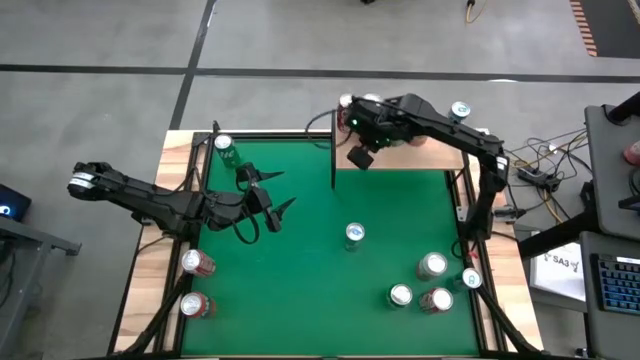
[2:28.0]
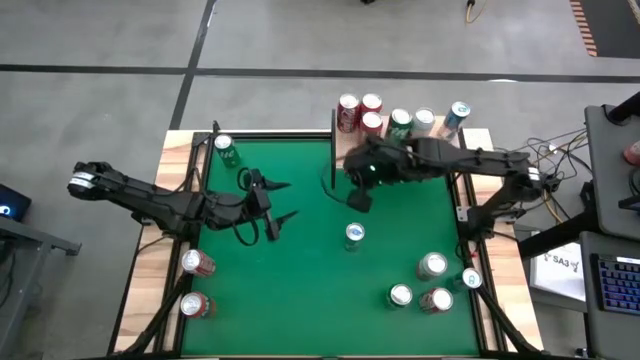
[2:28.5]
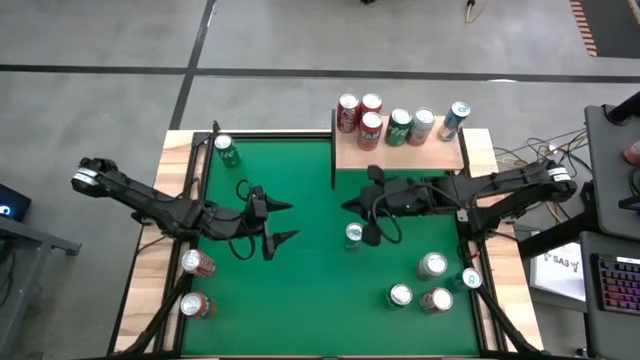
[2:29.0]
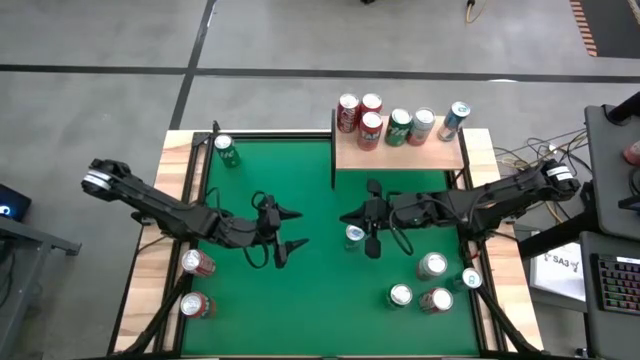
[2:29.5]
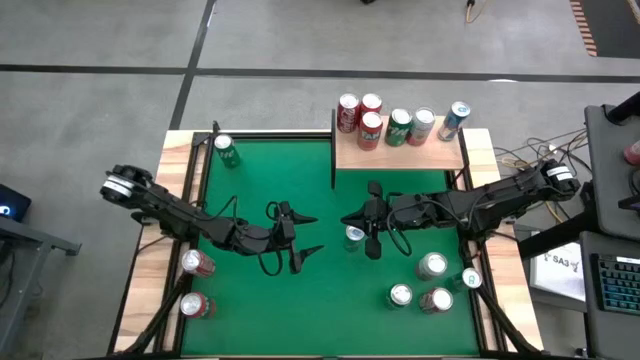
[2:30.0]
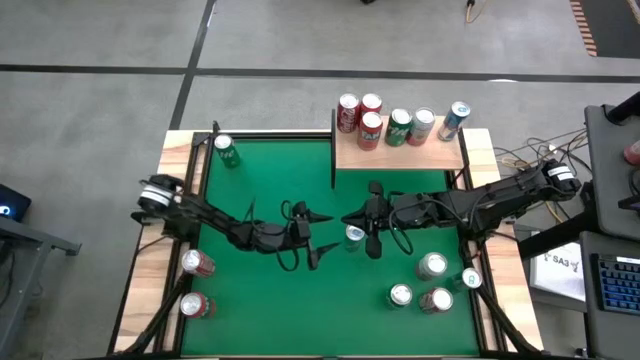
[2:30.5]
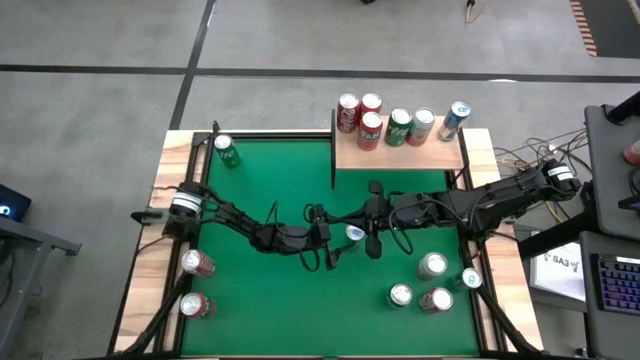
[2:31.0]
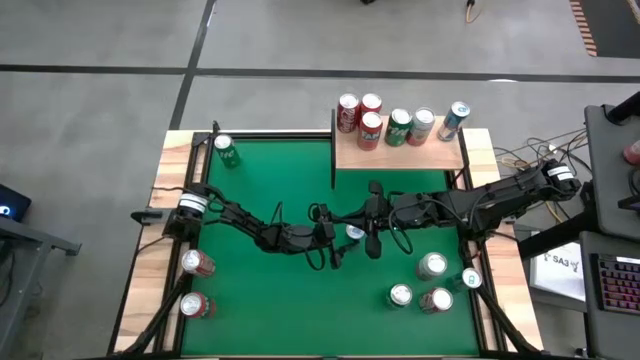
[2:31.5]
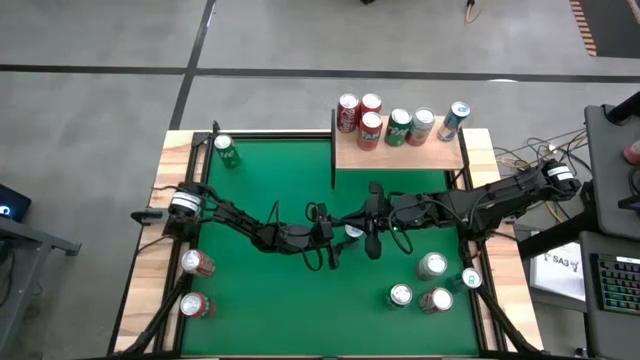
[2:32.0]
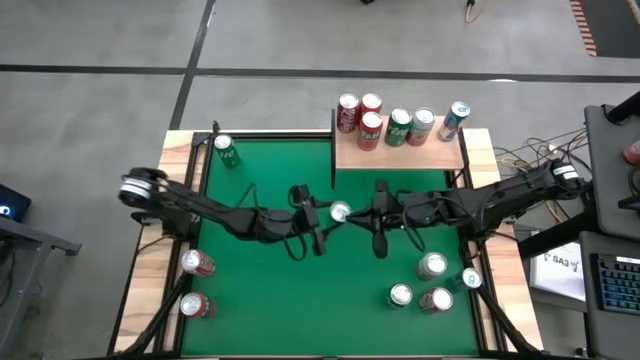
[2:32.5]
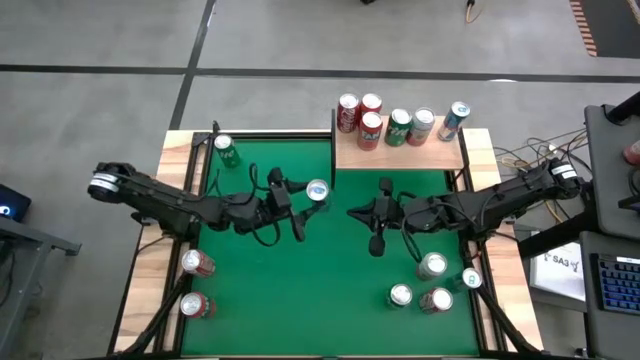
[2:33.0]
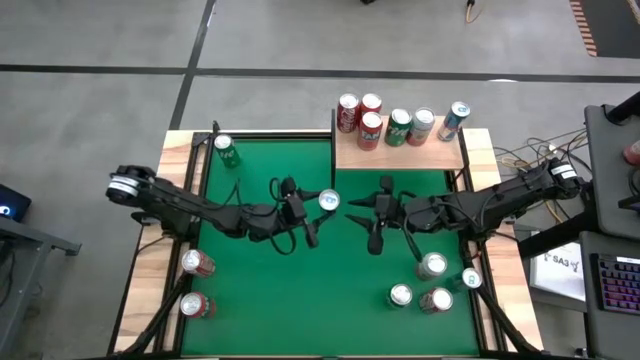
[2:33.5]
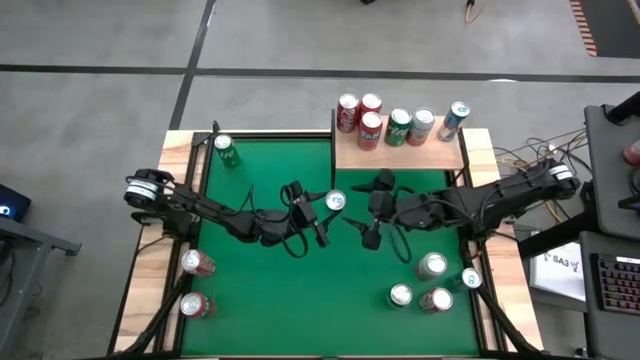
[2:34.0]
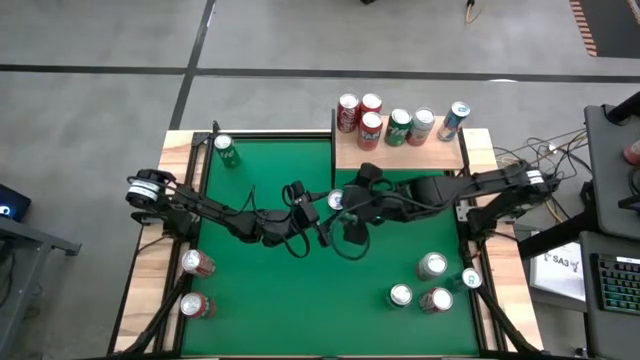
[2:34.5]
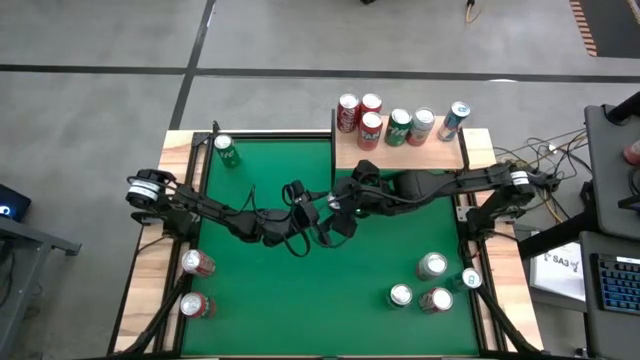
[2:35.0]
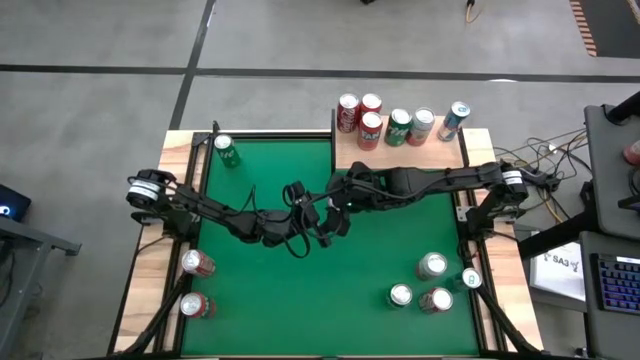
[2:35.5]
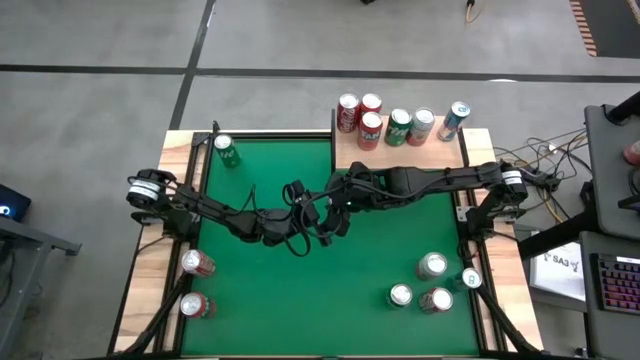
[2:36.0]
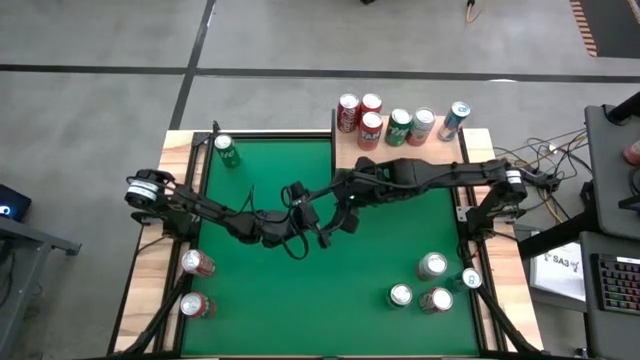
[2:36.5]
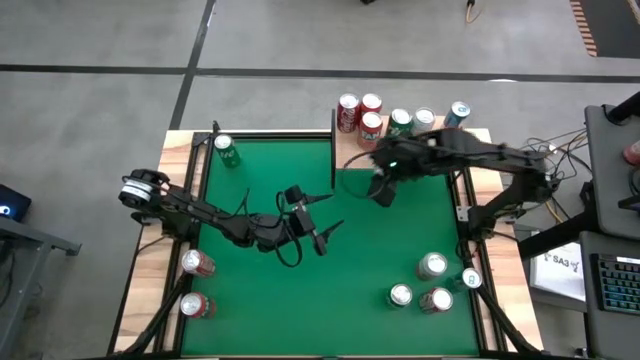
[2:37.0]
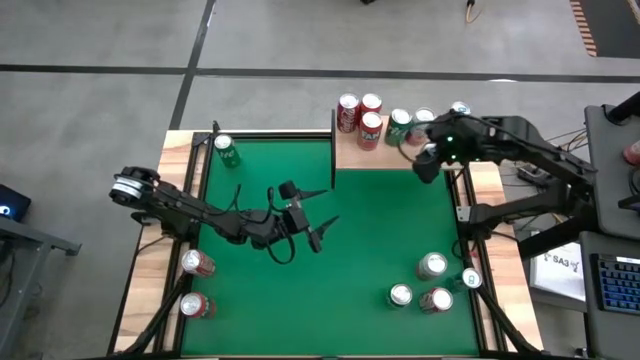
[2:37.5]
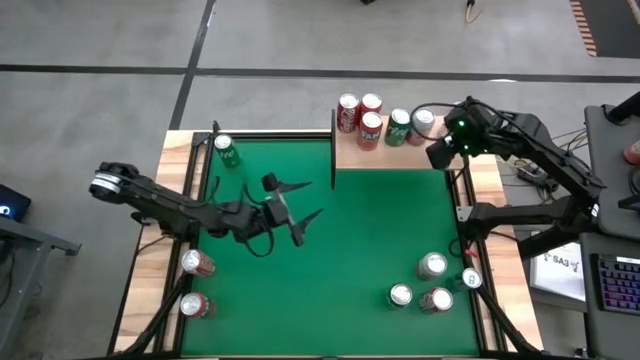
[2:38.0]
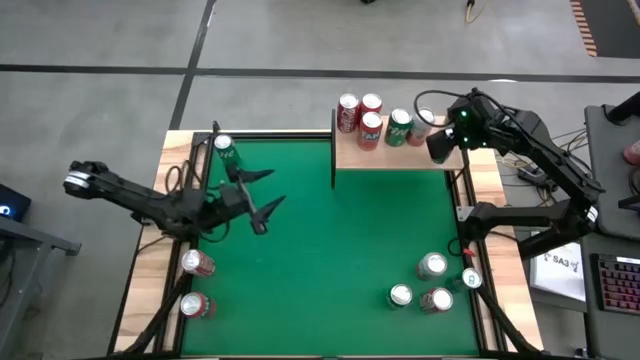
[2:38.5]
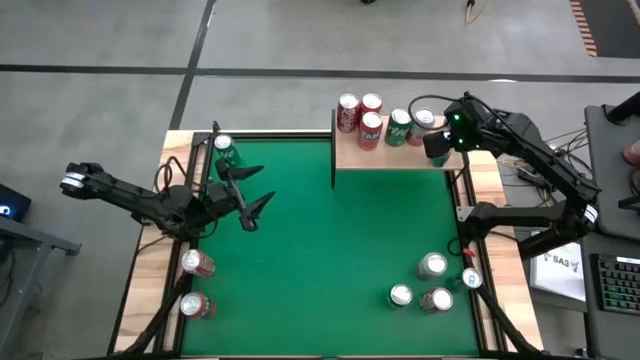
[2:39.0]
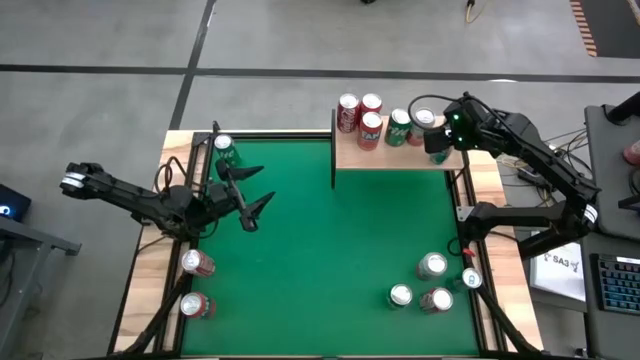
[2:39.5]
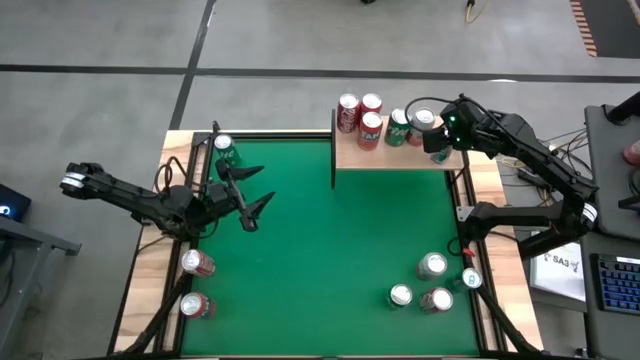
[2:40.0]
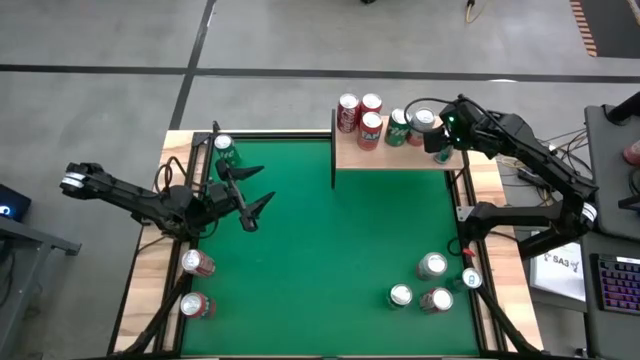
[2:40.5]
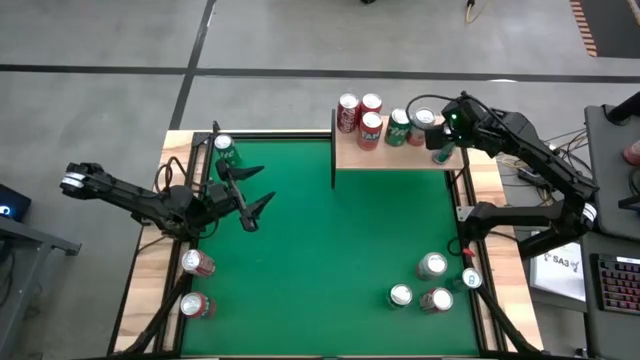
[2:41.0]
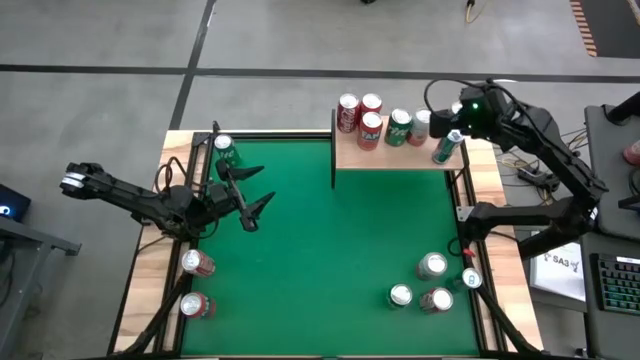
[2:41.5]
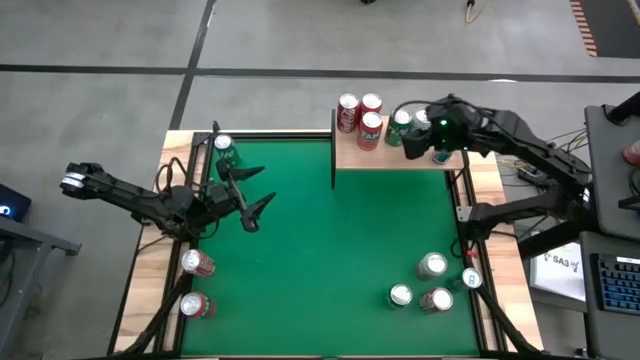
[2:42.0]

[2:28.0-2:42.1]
Task: Place canned beverage on shelf
Put the top blue soda can on the shelf aligned with the other blue soda can

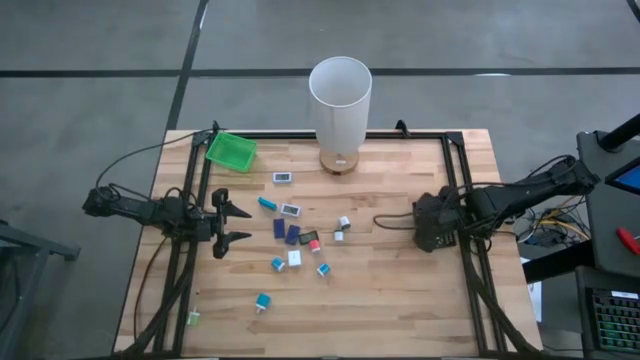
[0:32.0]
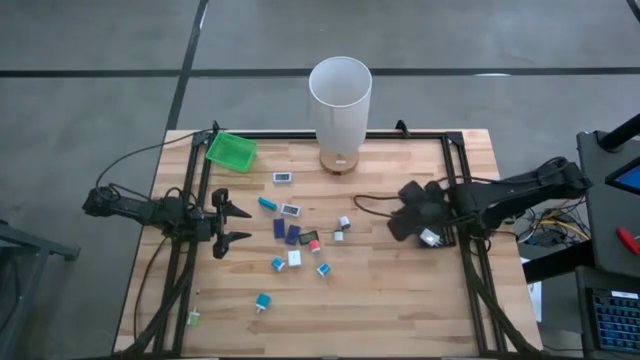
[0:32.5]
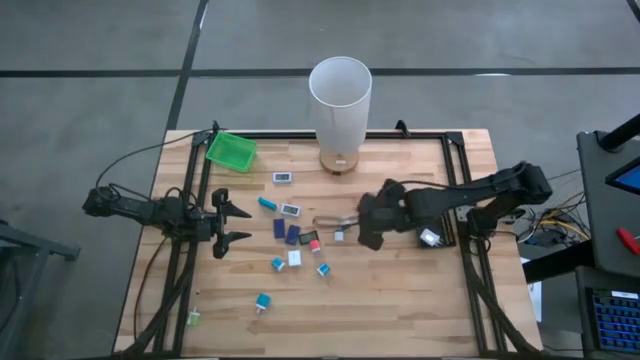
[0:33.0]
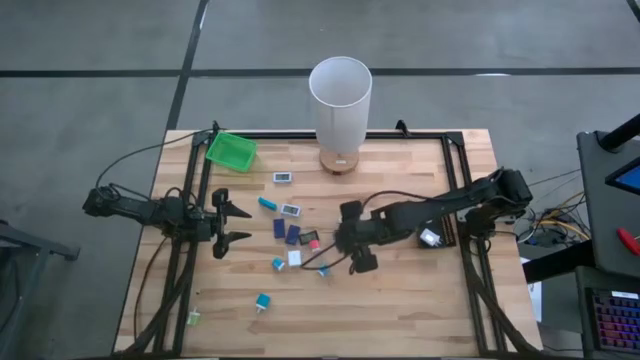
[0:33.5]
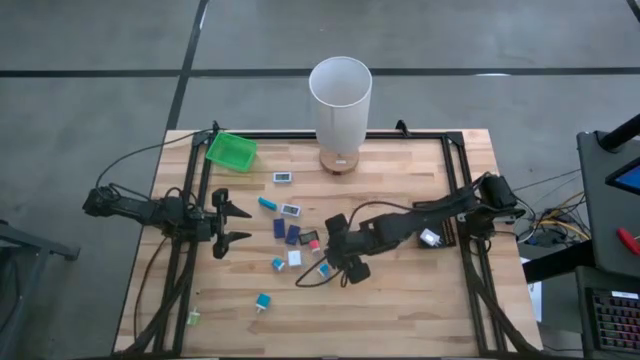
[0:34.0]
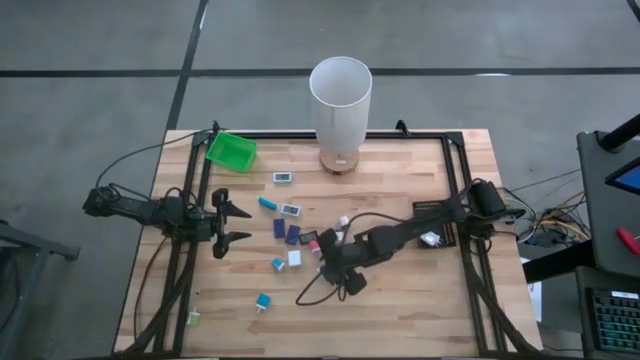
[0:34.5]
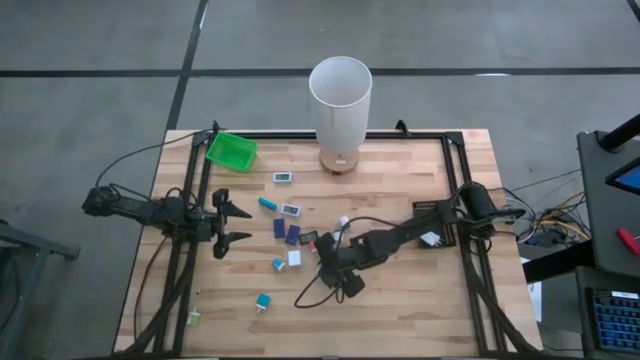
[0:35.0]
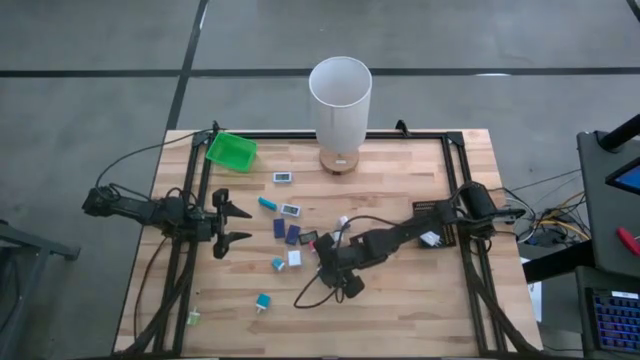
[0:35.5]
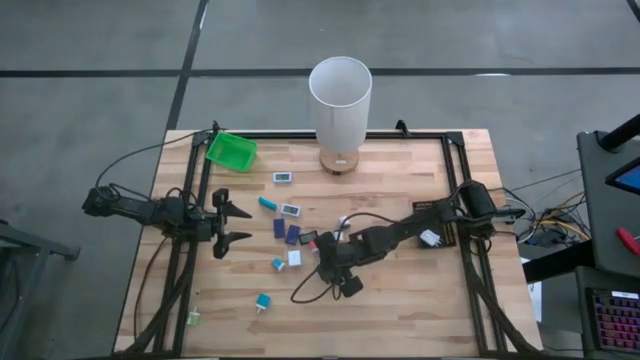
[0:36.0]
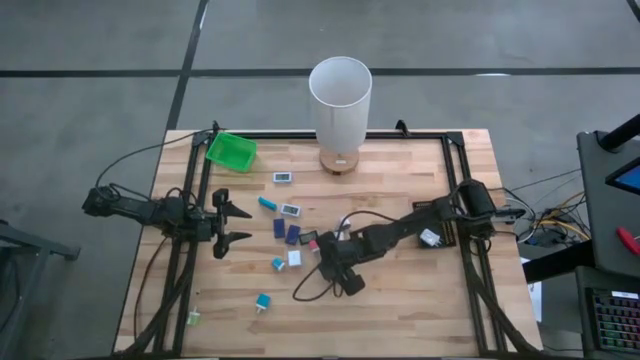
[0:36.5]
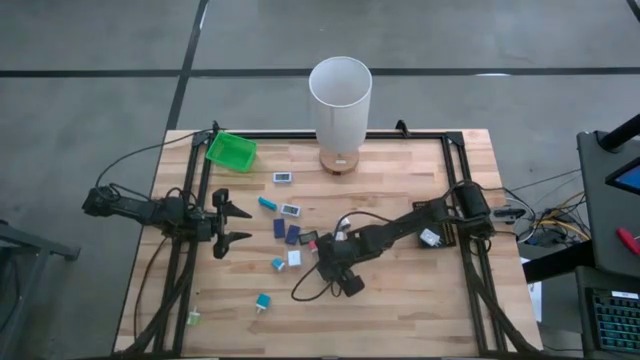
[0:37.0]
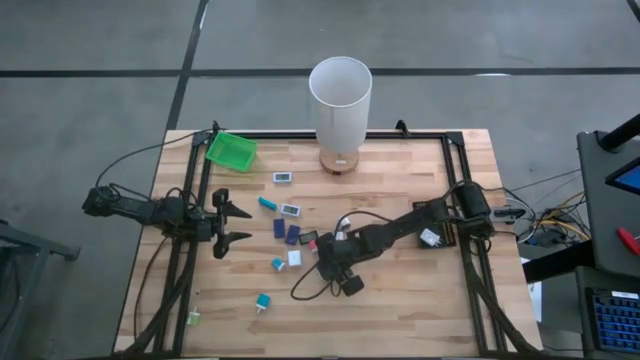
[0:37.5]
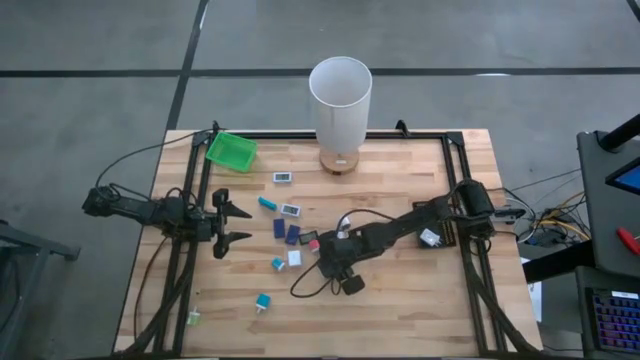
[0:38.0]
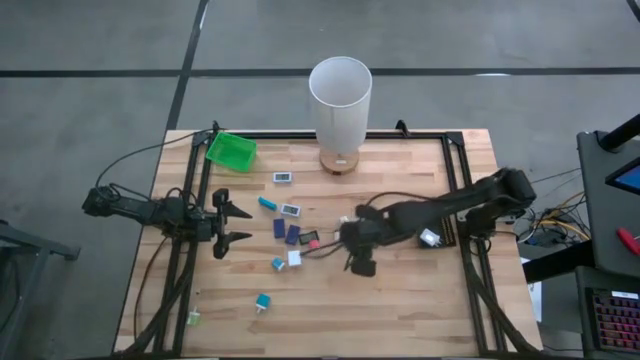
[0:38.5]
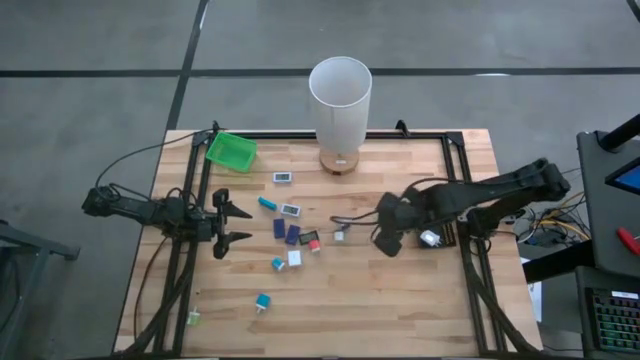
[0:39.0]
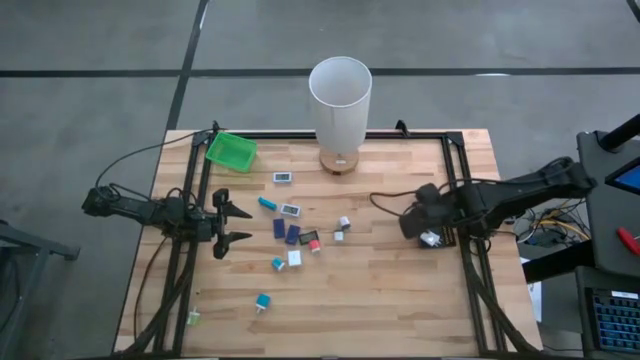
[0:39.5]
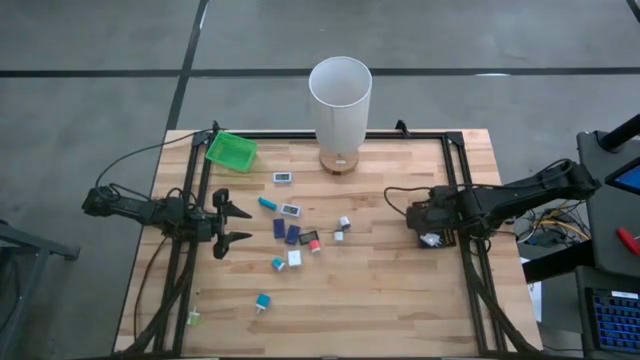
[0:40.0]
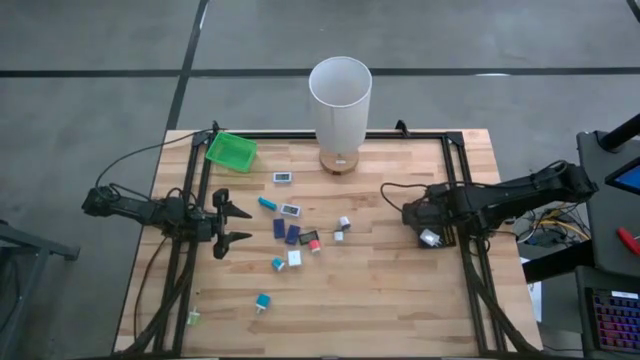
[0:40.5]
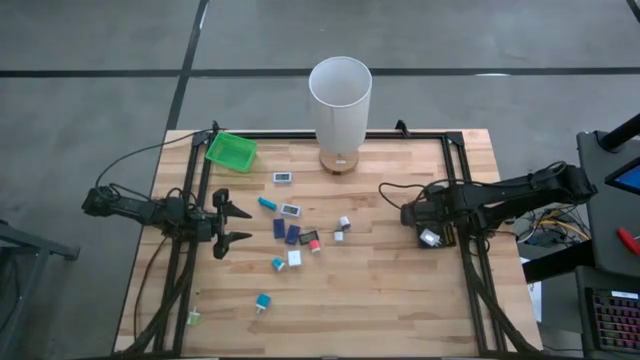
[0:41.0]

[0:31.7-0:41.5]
Task: Pick & Place Office items
Put the top right blue charger adapter into the black bin
